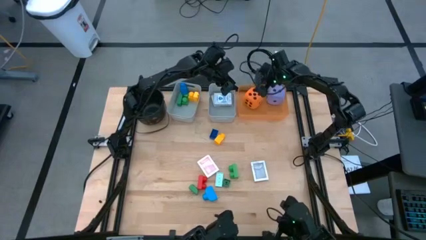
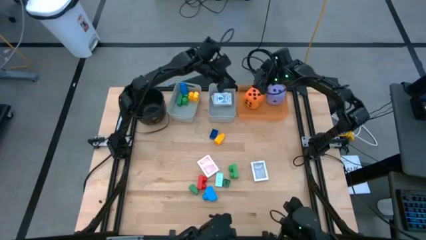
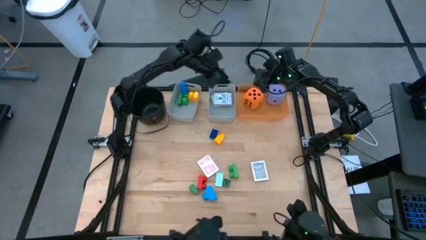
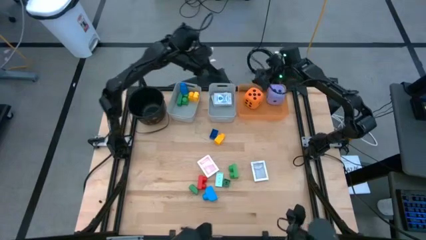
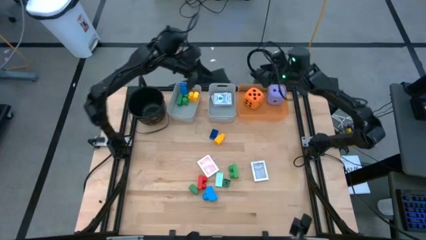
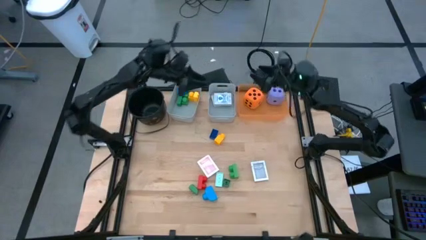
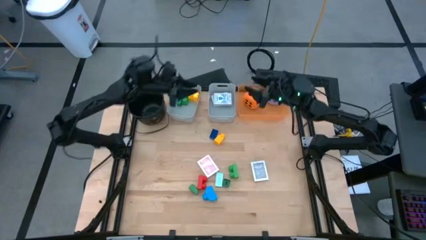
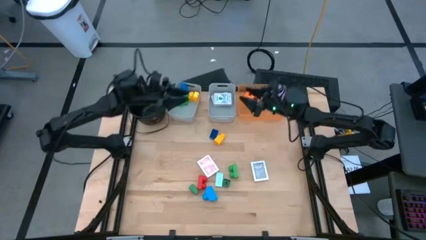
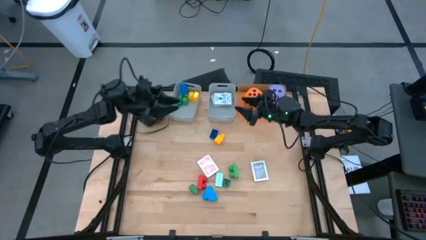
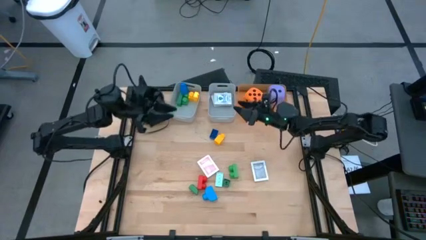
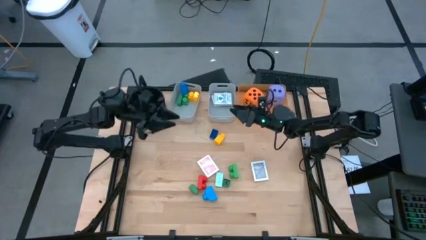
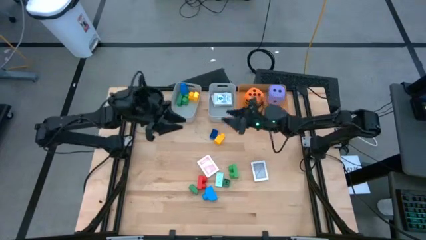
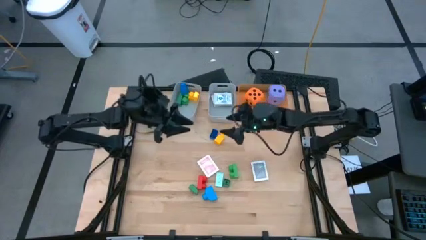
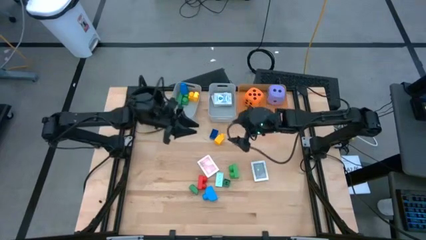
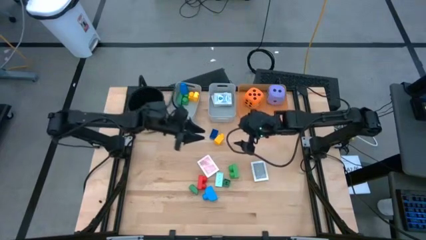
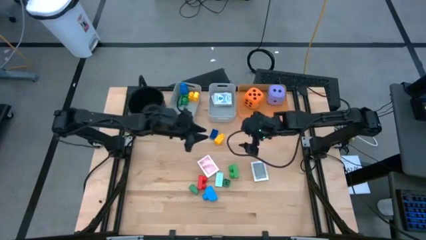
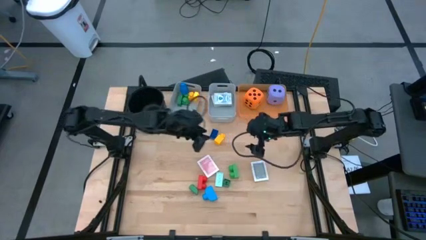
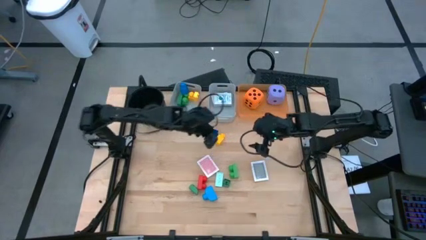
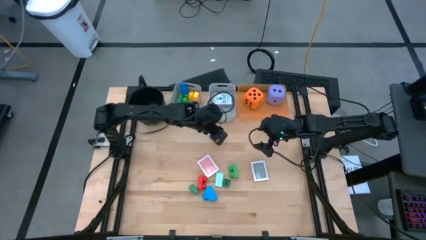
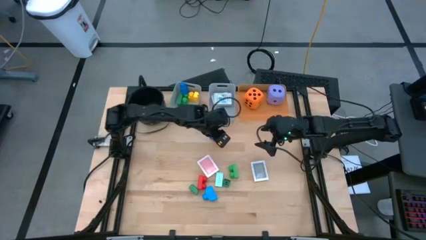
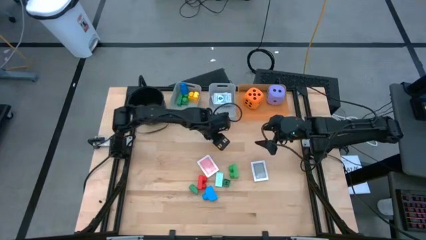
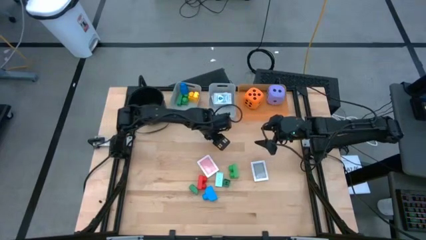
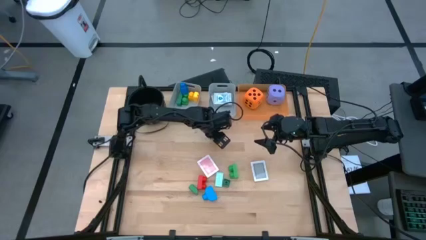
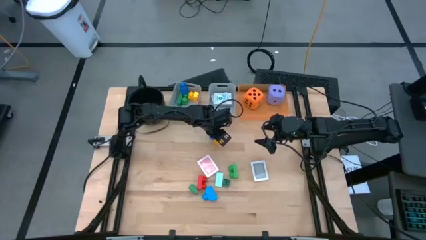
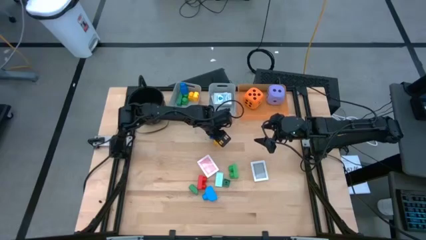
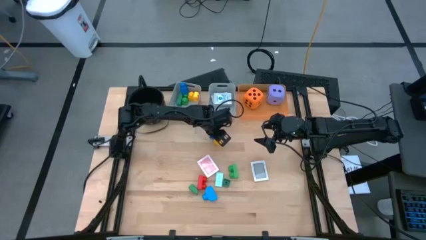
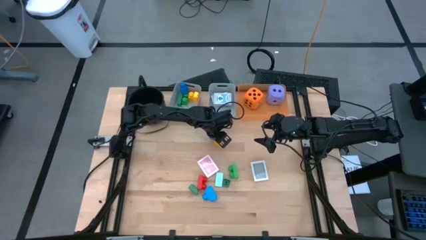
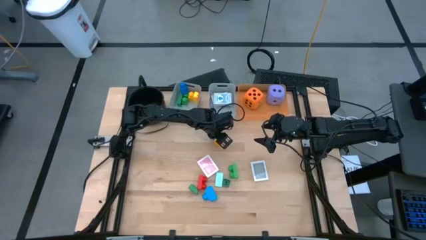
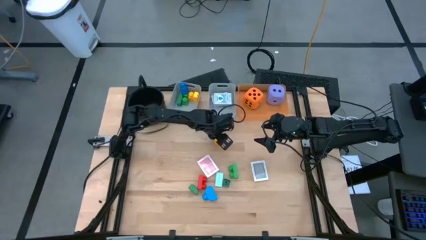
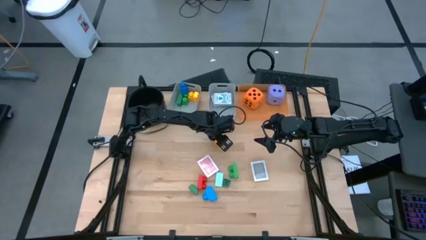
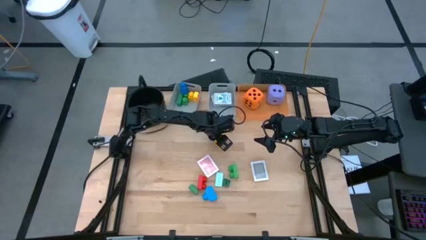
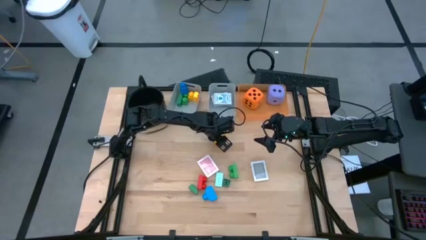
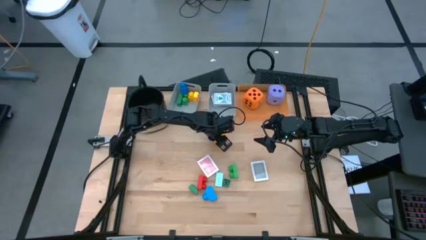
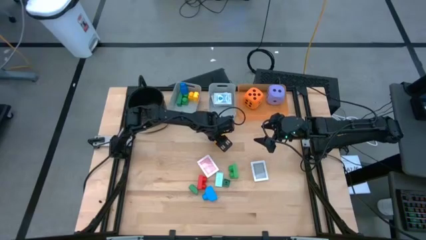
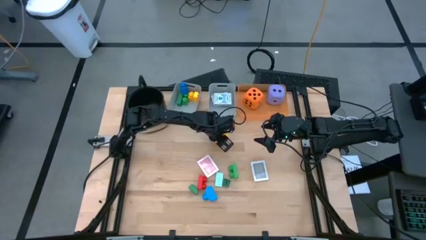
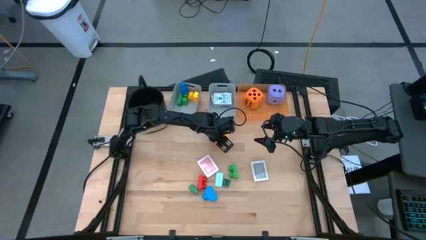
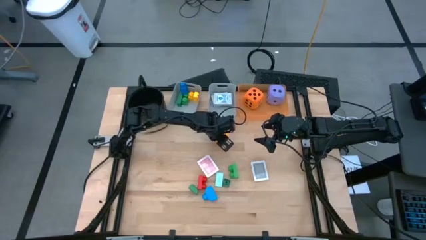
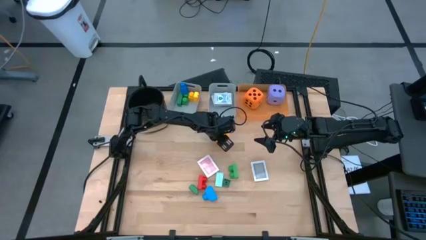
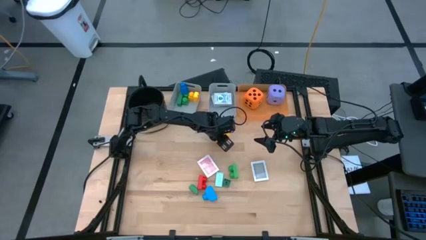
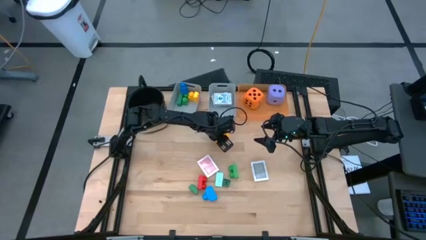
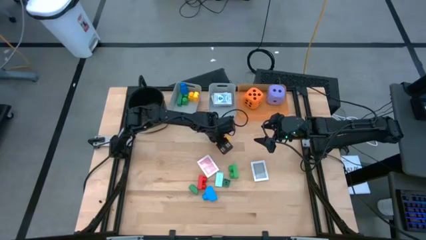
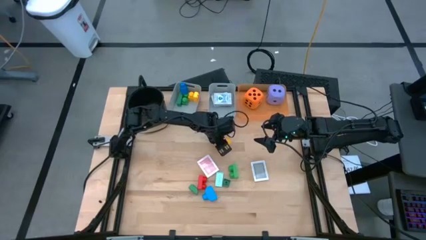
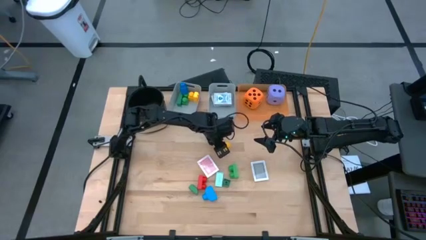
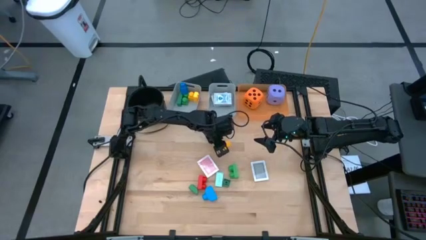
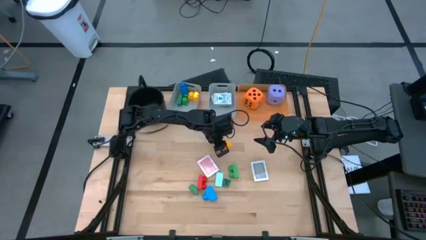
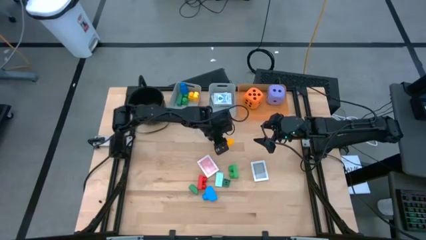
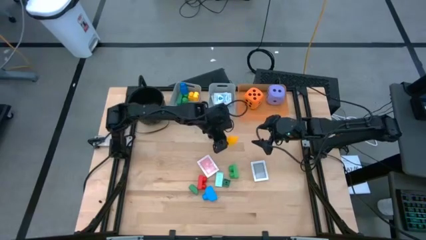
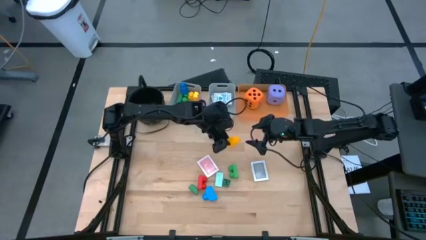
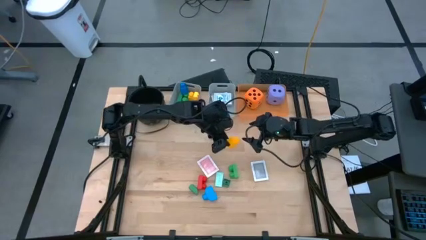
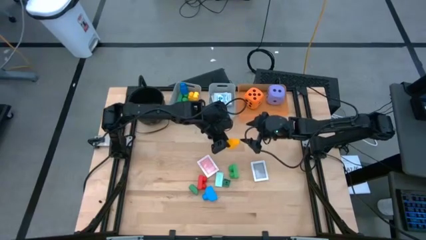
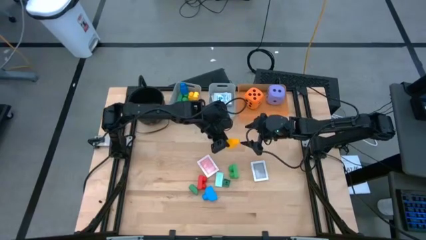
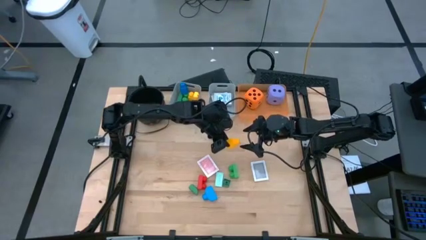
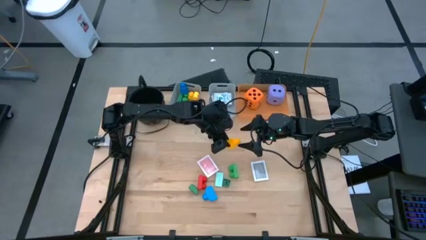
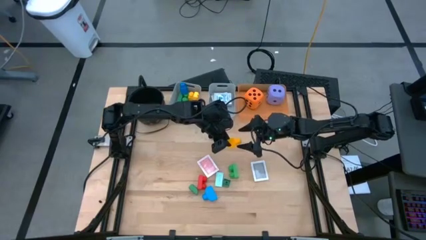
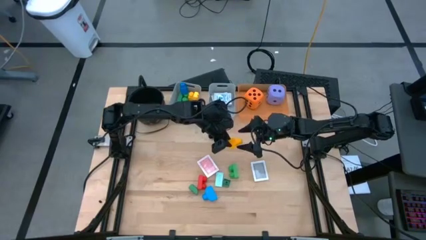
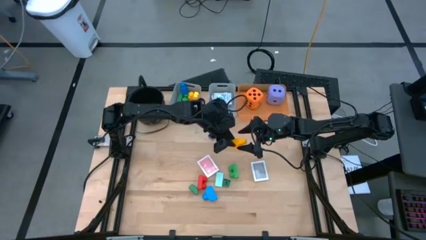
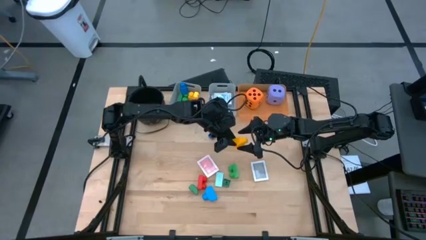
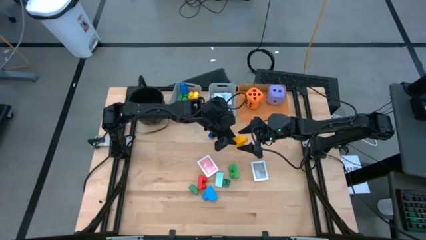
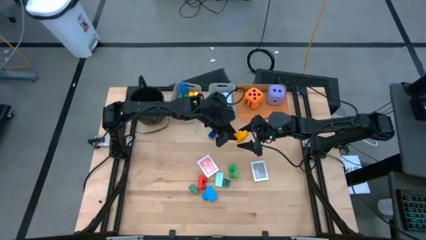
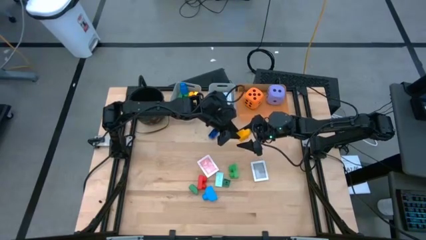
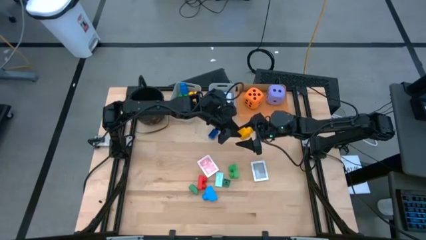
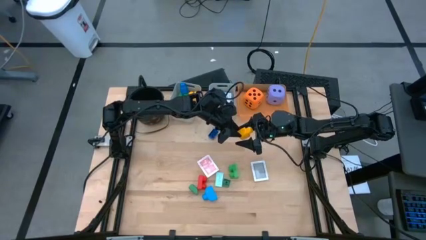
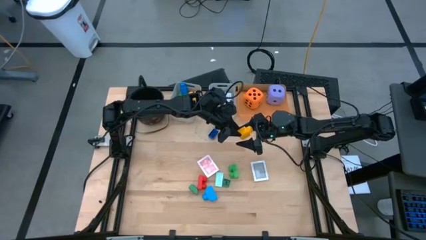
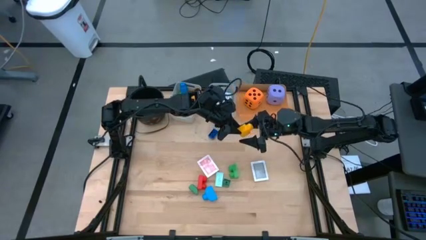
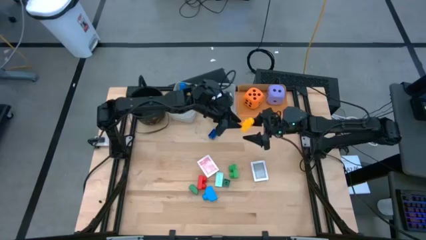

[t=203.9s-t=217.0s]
Task: Pick & Place Toys
Put the yellow game piece into the left gray bin
